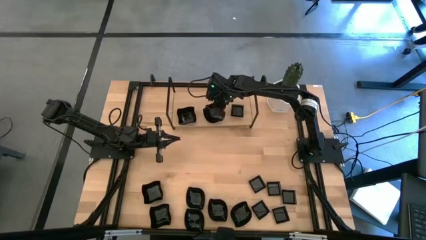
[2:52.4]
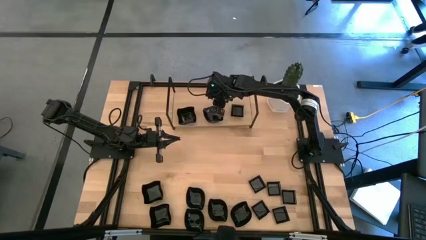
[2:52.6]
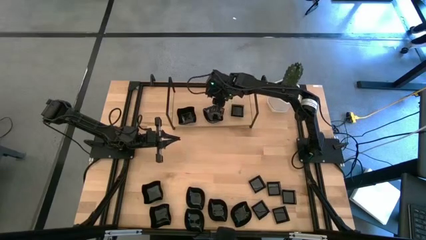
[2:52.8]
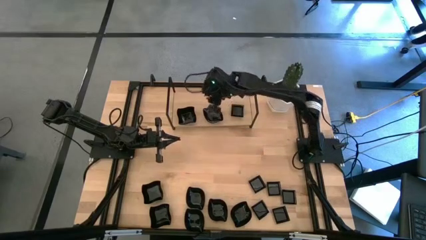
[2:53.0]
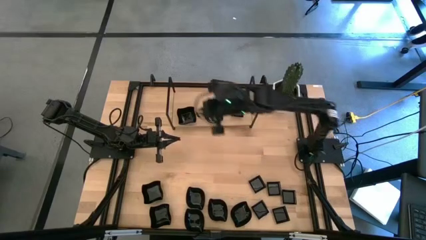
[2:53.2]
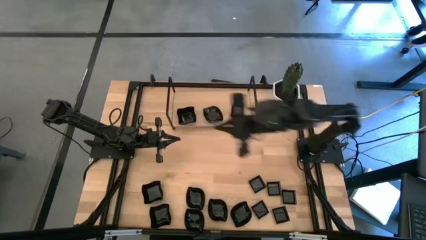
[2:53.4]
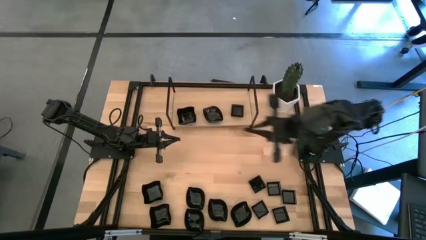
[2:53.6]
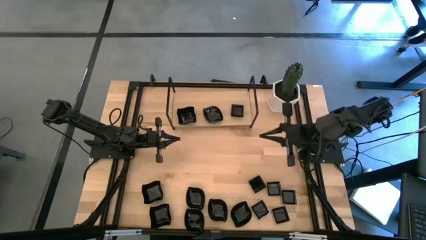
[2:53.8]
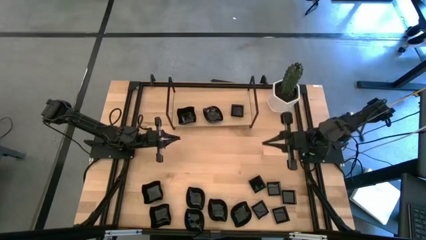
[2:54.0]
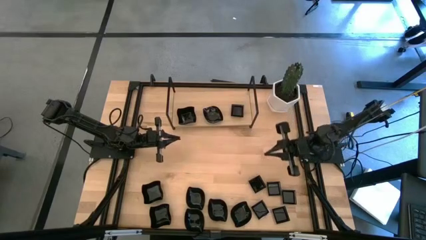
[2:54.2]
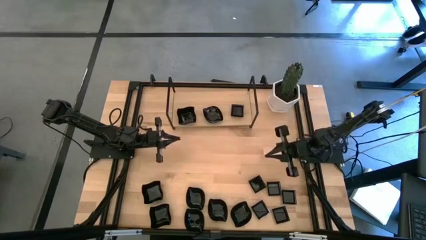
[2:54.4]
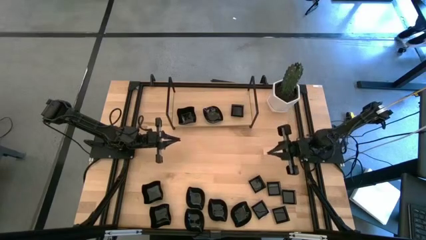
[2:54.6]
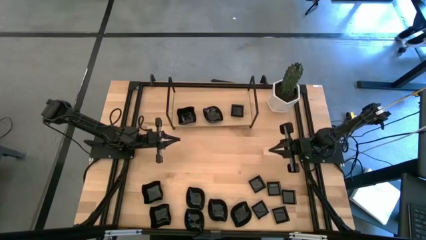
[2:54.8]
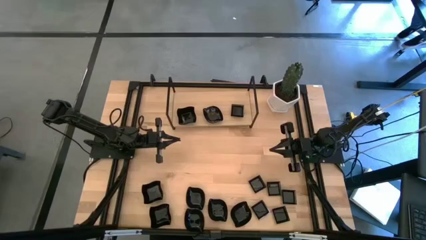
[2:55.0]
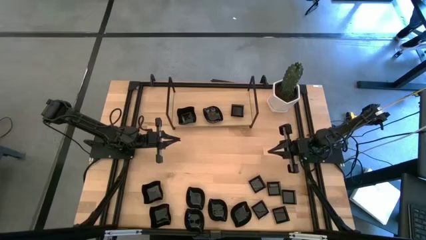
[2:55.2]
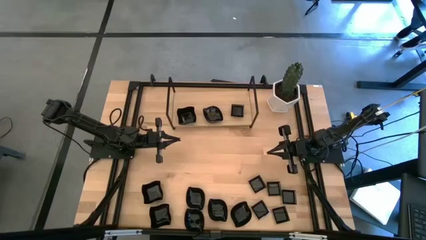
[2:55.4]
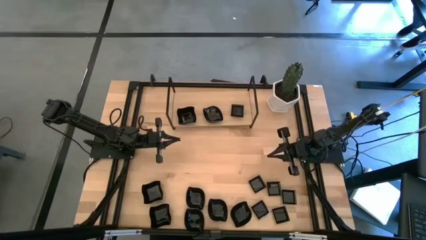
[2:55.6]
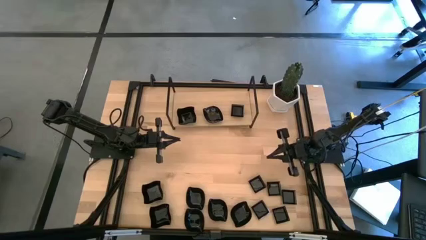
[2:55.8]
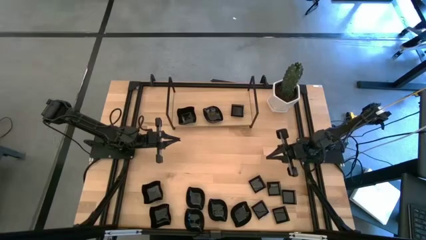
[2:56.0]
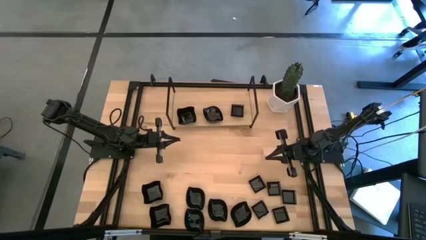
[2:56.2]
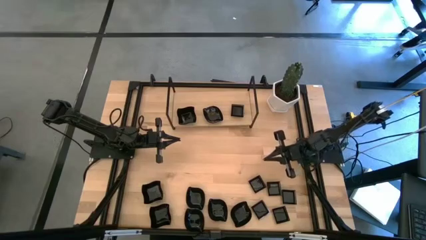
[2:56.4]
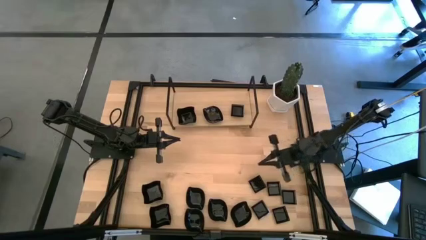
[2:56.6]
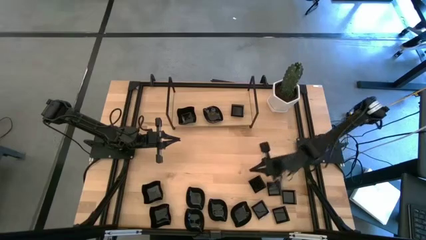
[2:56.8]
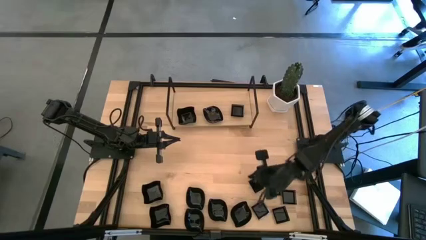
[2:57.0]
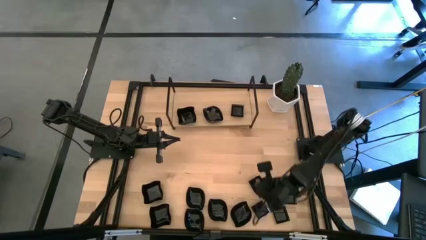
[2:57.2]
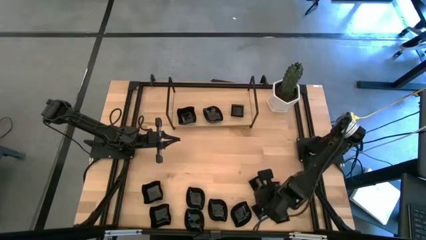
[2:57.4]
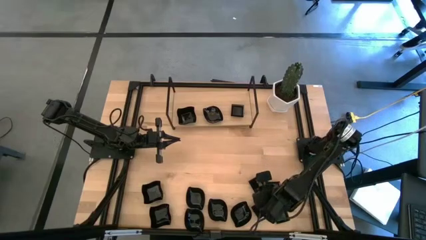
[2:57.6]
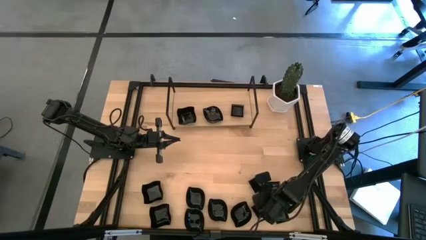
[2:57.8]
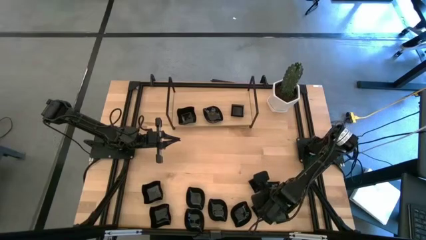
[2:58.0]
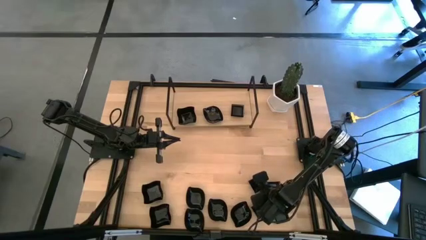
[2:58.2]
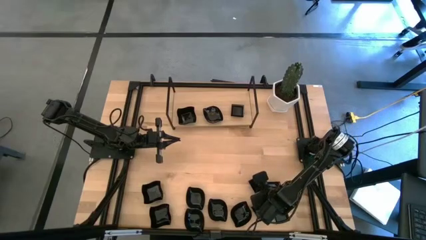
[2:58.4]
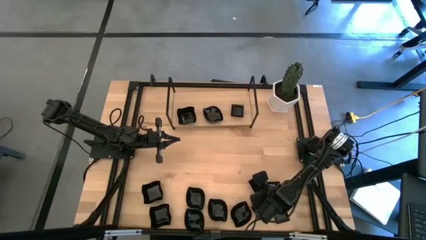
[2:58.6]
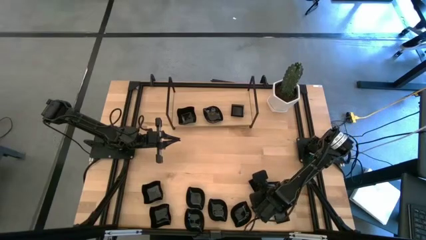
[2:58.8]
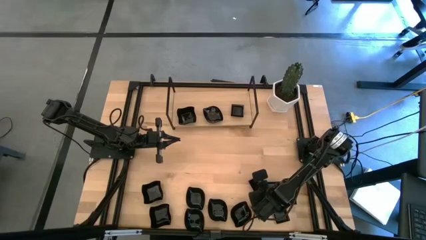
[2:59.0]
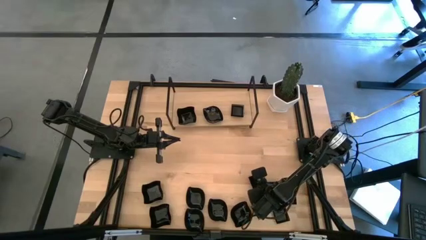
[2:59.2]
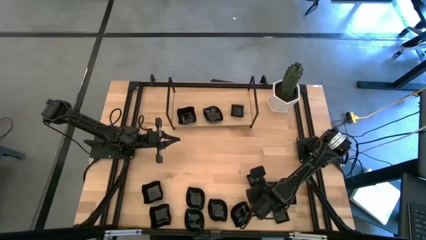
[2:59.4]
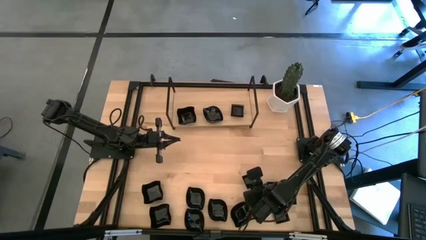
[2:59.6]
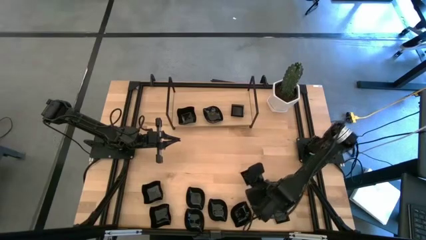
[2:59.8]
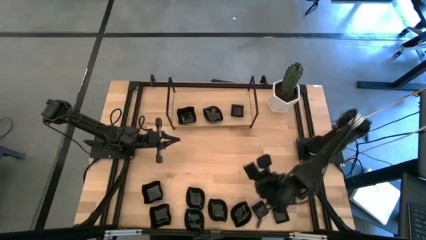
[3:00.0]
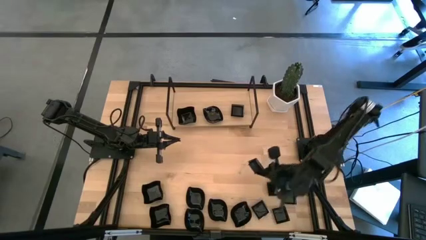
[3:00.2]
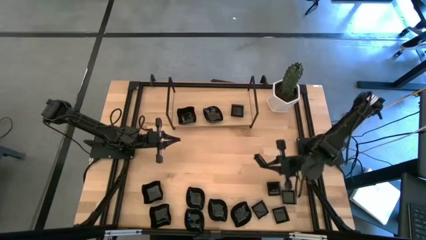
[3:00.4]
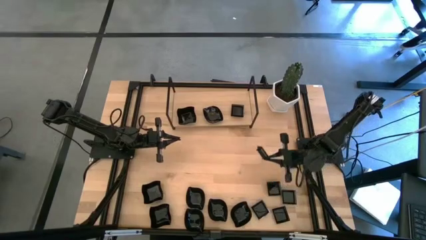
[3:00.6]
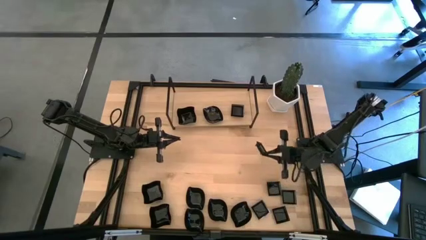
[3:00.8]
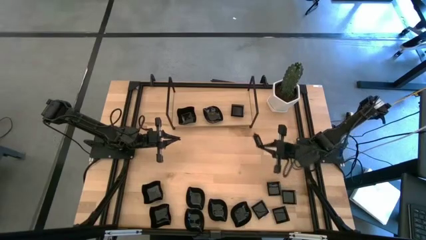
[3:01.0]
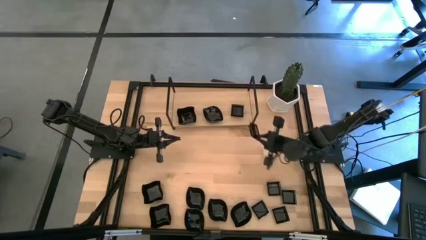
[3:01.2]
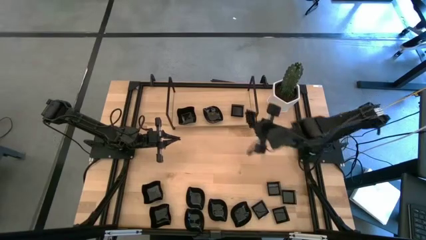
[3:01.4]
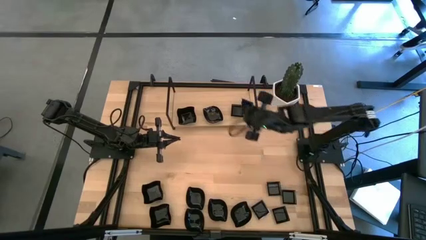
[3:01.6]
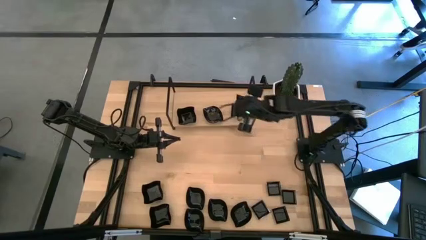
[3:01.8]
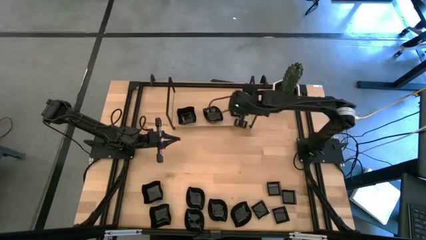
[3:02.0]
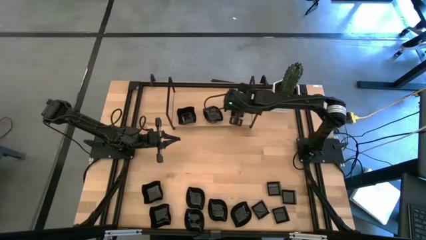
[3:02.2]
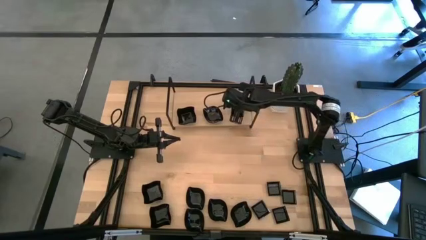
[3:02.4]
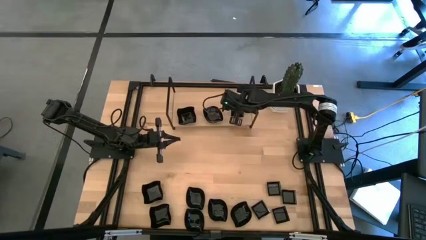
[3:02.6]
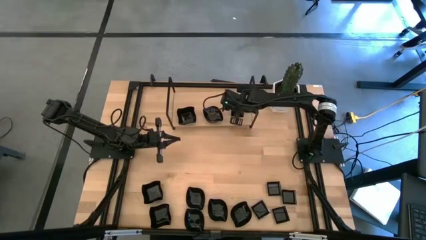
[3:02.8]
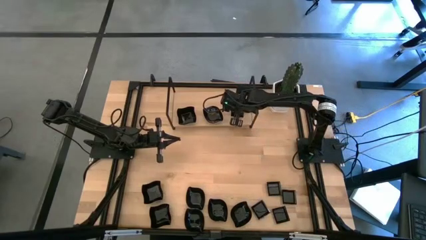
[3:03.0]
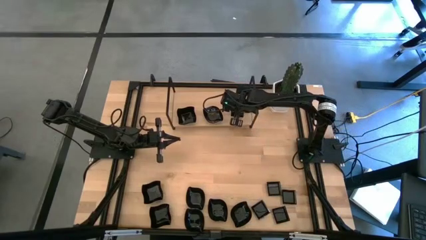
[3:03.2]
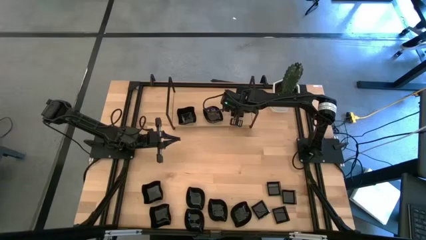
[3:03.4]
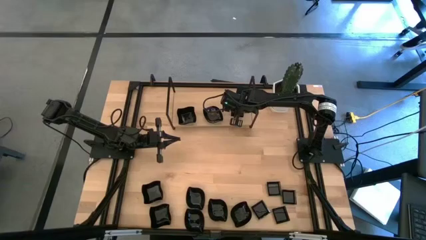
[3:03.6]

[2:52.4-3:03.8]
Task: Pick & Place Mini shaped plates
Stack the black square plate on top of the black square plate on the shelf

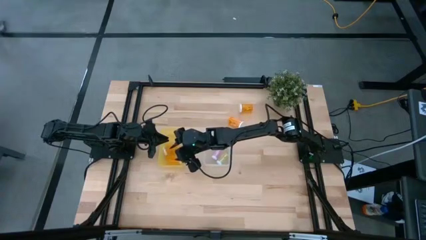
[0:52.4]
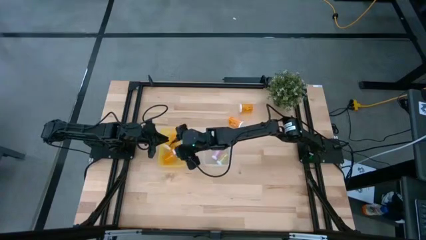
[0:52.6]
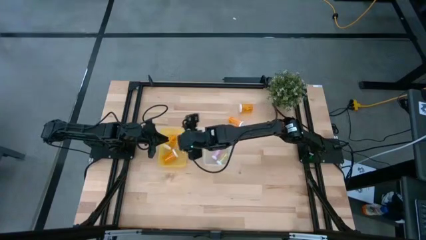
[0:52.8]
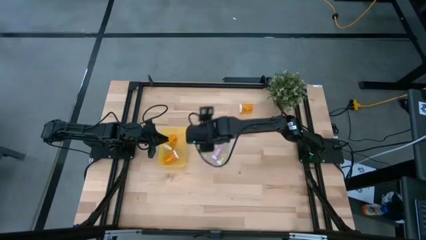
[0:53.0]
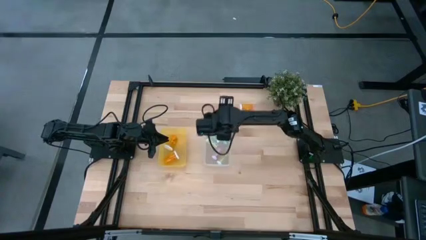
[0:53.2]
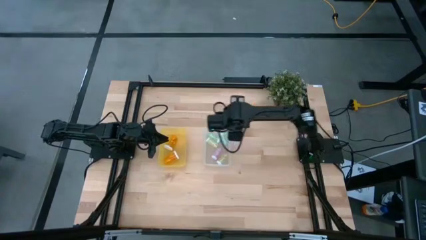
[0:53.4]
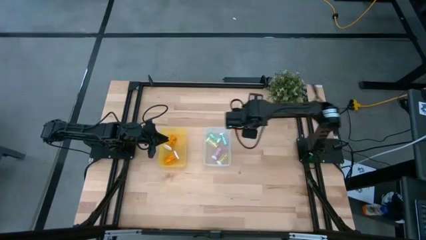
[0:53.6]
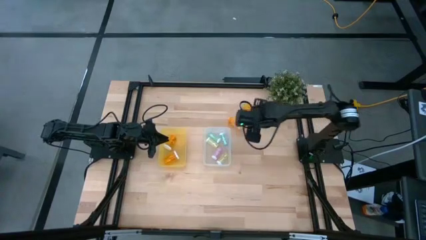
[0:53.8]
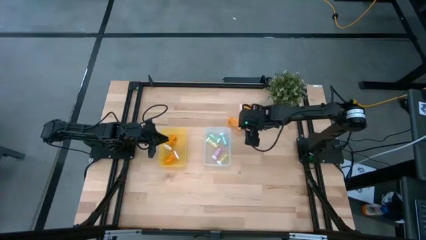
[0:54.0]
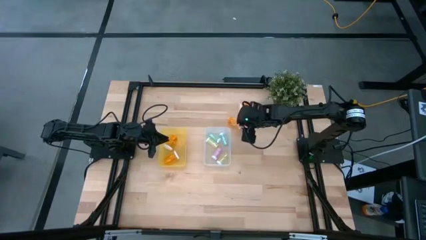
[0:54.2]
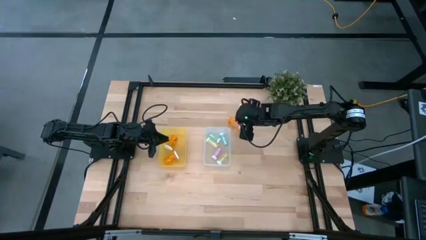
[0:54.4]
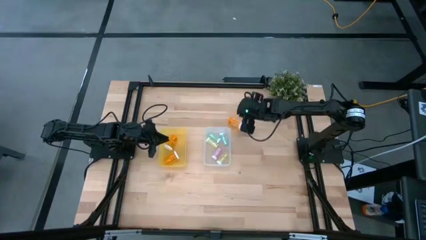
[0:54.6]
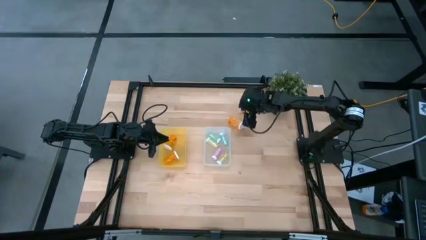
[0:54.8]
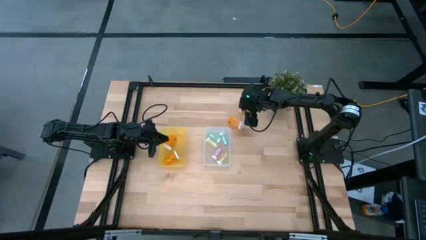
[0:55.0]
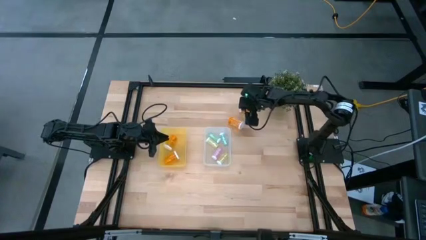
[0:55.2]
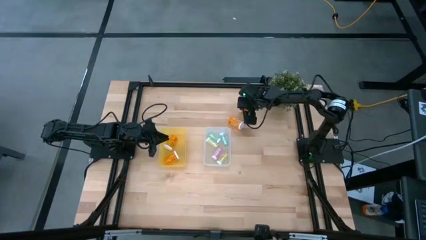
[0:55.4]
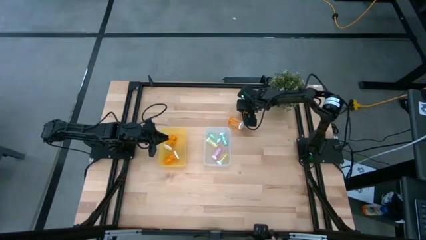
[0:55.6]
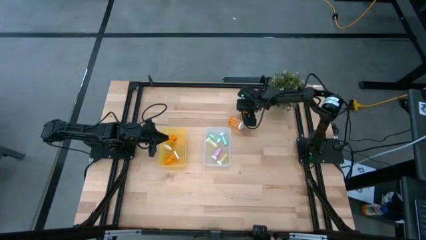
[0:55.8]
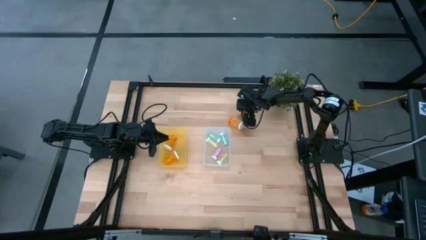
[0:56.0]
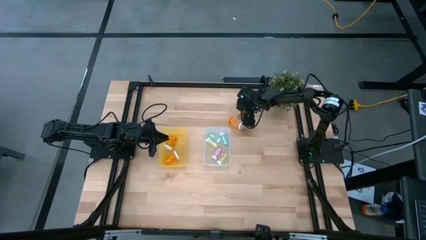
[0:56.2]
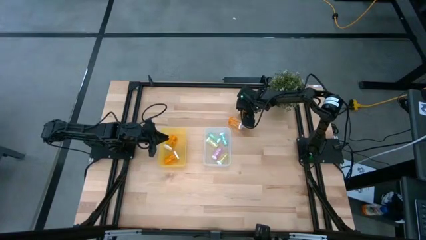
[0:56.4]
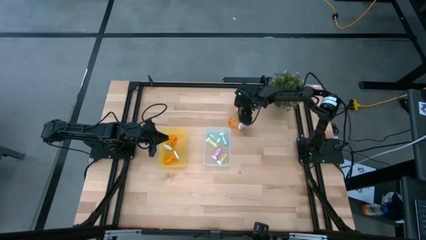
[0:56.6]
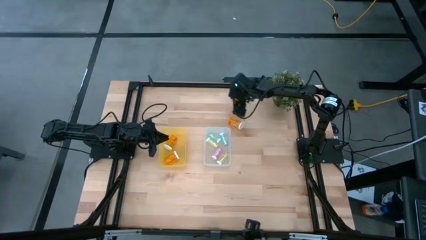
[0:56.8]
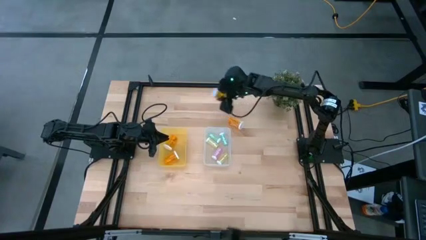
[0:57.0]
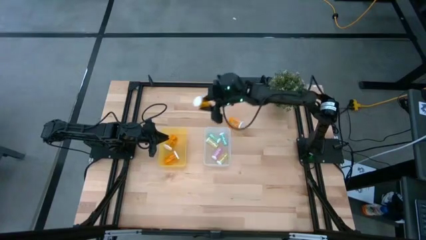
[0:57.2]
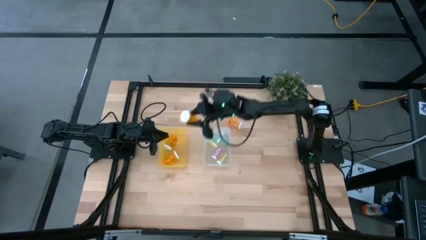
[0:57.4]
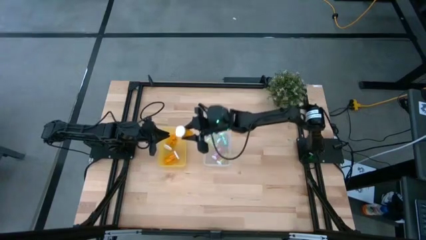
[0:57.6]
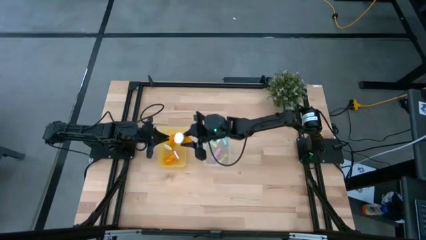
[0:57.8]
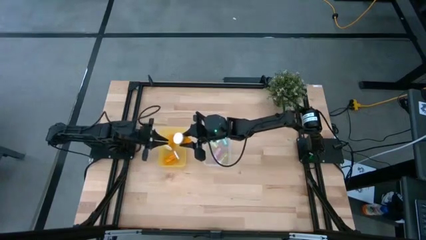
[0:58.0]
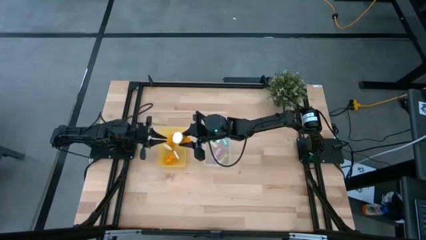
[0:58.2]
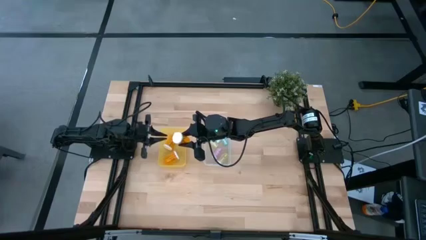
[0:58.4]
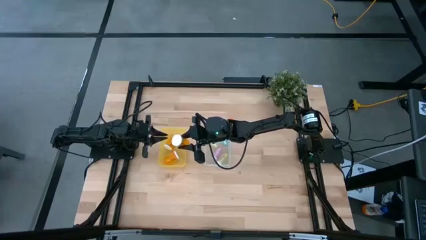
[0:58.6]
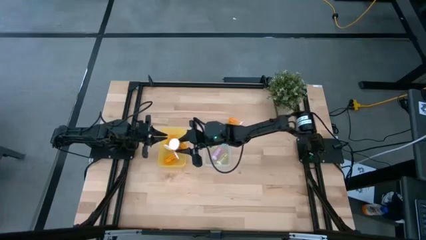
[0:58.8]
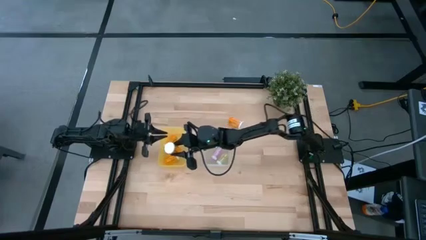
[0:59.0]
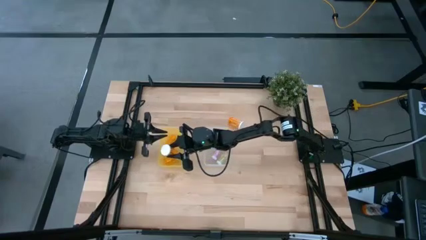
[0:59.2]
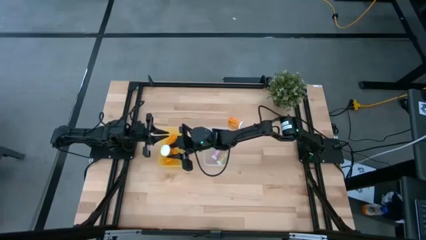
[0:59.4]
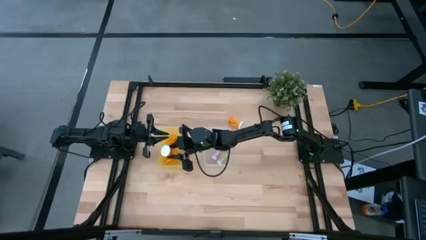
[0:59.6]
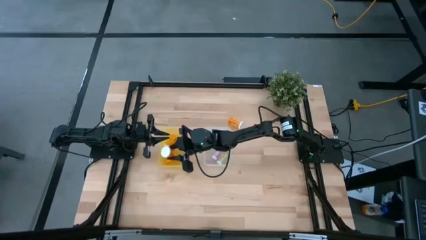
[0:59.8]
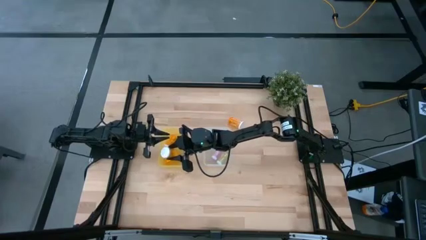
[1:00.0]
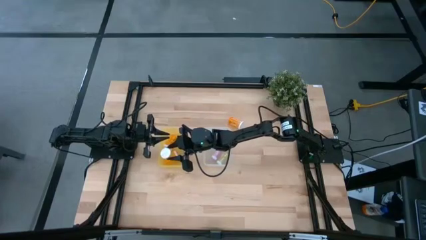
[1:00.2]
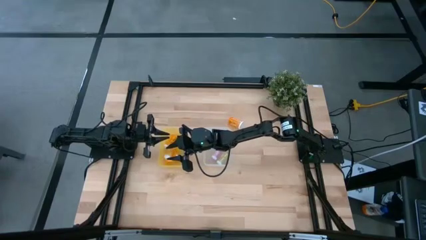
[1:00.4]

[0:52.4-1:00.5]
Task: Pick and place medicine bottles into bin by pill shape (circle, oval)
Put the orange pill bottle into the yellow bin
